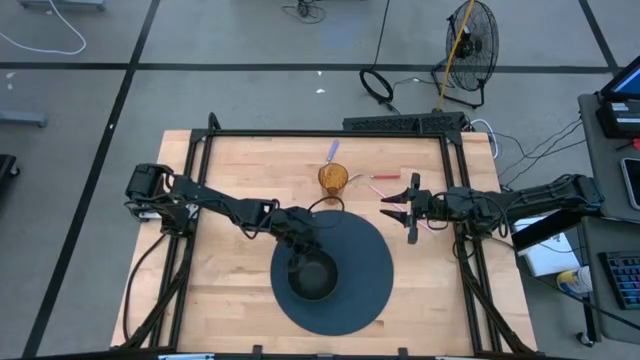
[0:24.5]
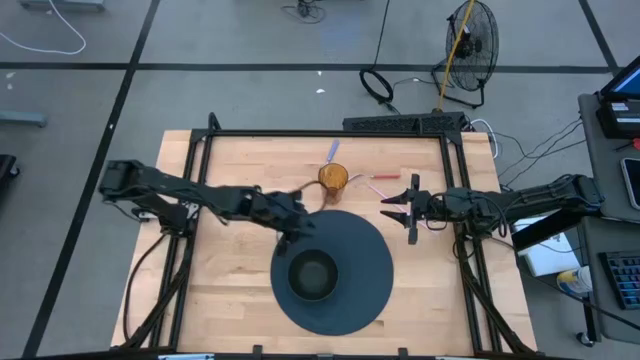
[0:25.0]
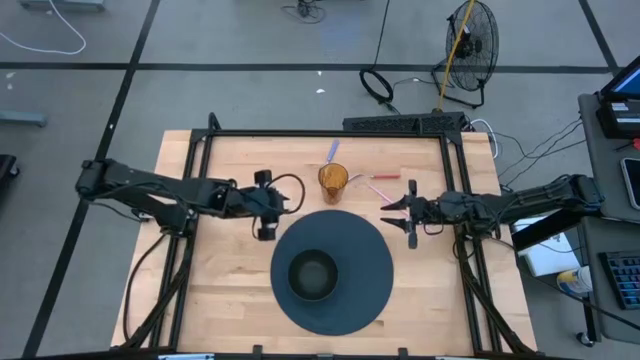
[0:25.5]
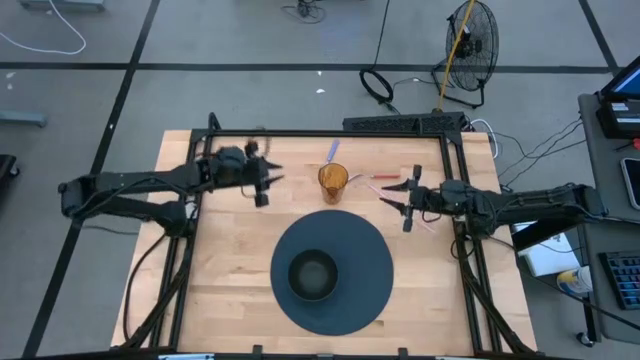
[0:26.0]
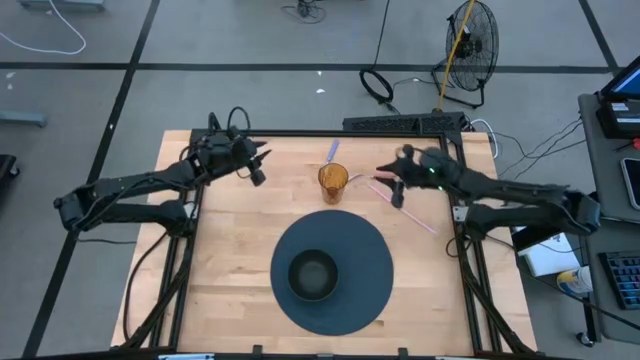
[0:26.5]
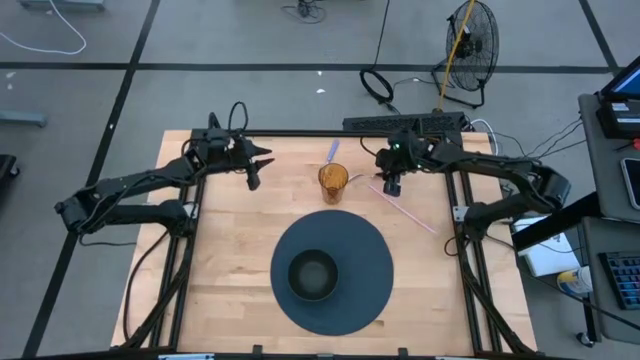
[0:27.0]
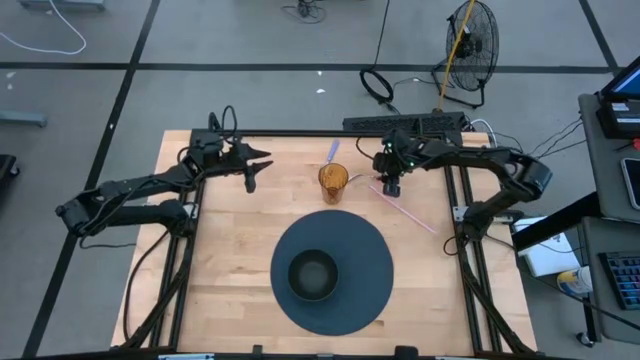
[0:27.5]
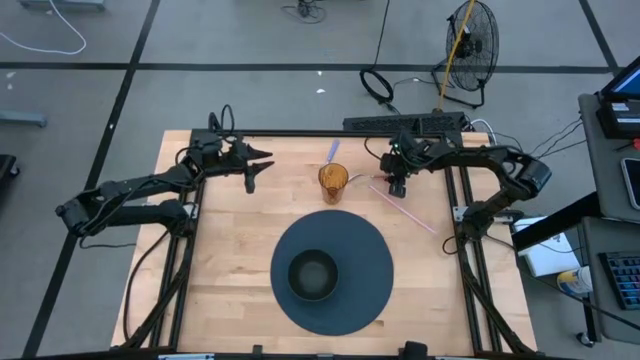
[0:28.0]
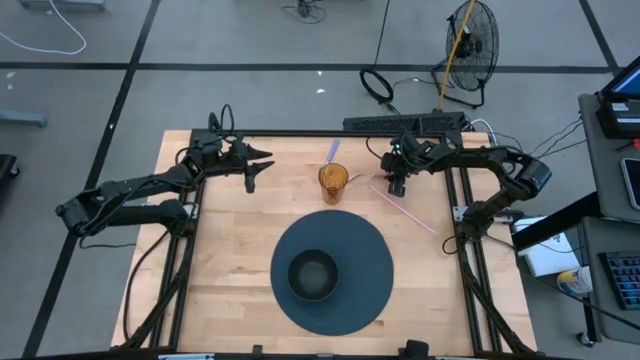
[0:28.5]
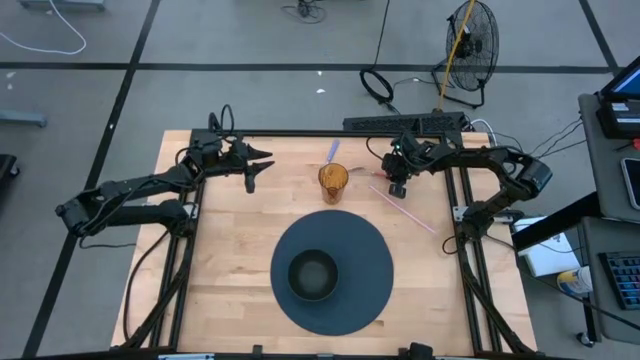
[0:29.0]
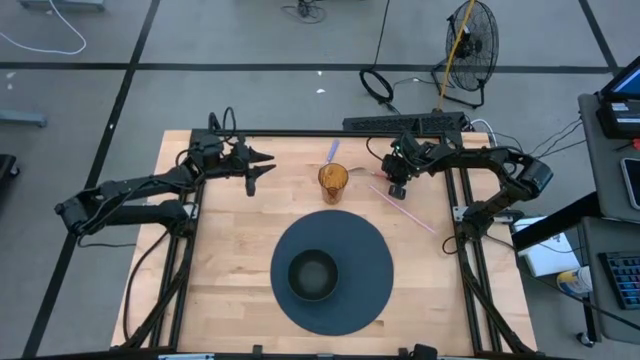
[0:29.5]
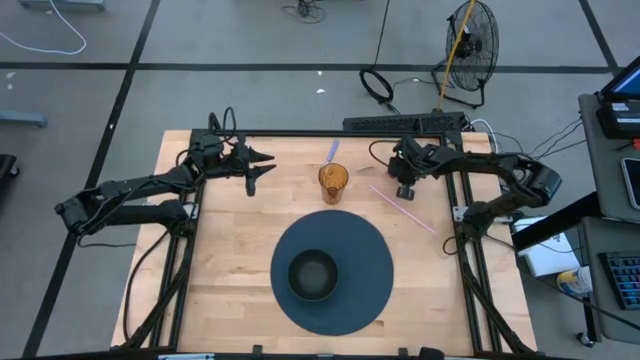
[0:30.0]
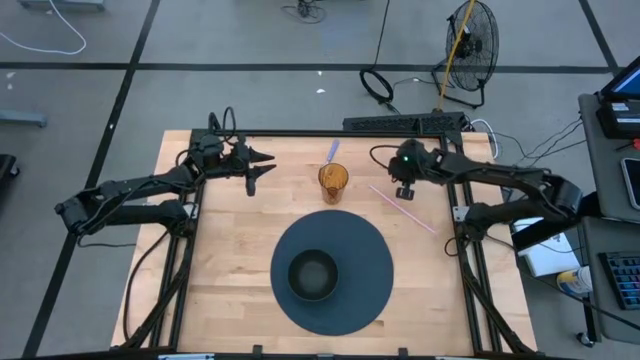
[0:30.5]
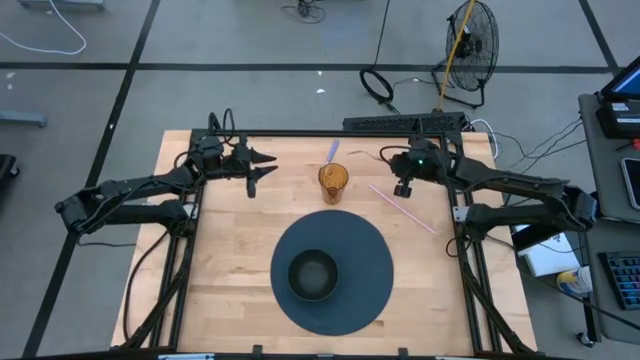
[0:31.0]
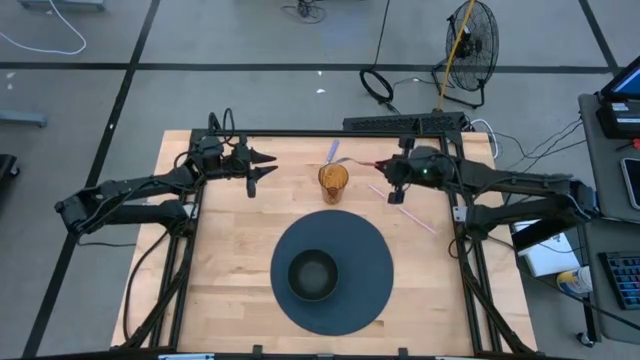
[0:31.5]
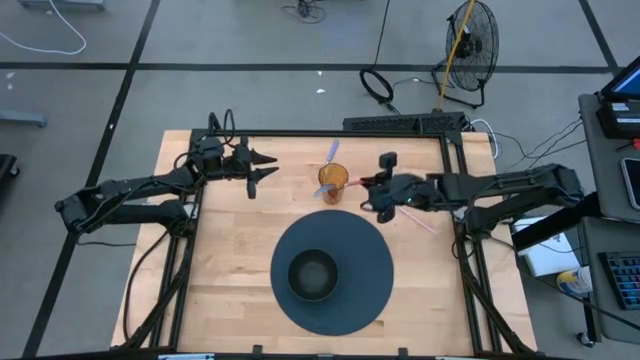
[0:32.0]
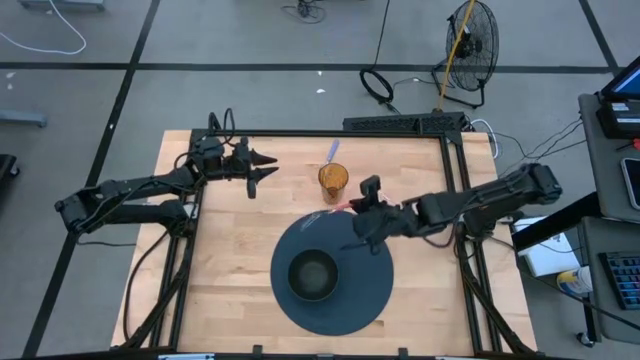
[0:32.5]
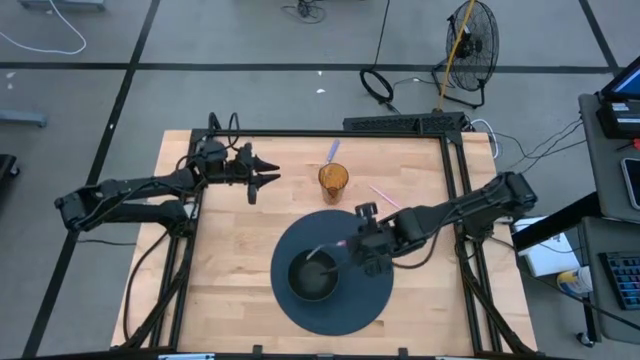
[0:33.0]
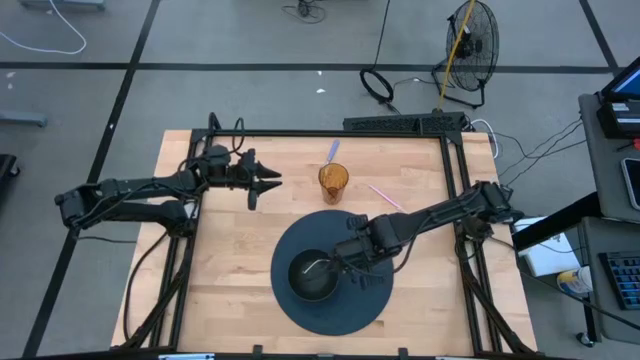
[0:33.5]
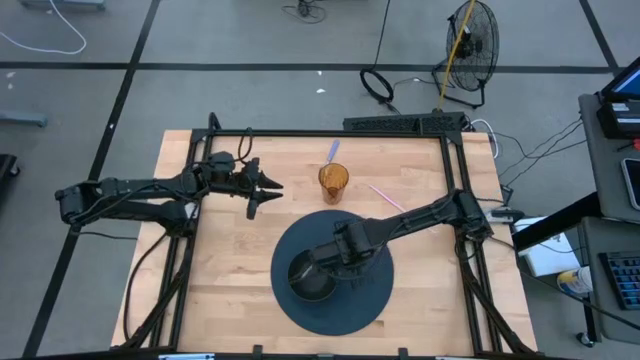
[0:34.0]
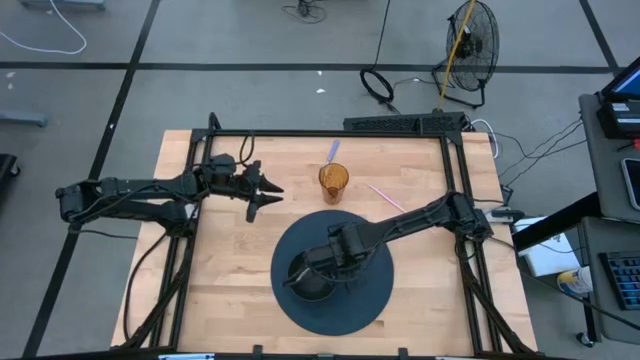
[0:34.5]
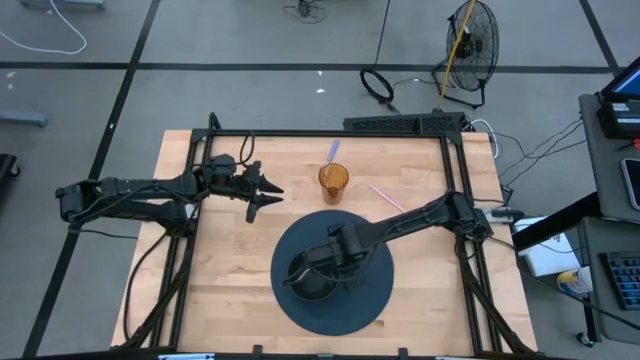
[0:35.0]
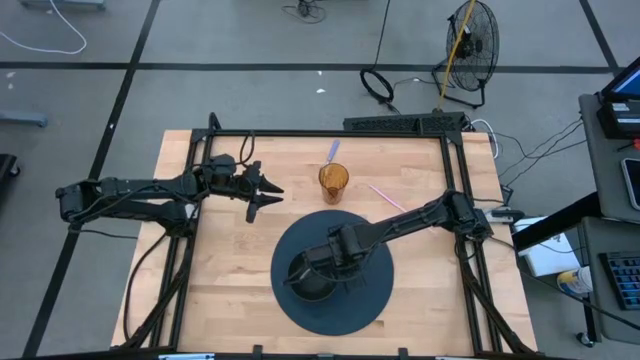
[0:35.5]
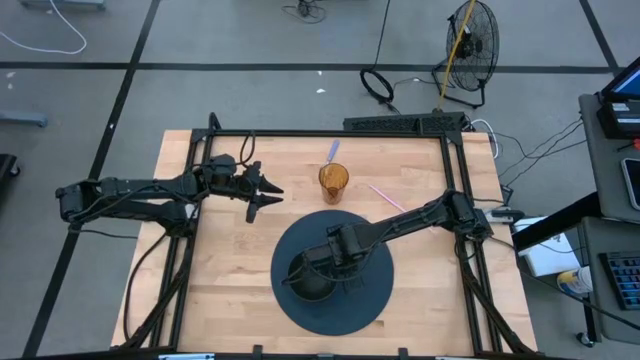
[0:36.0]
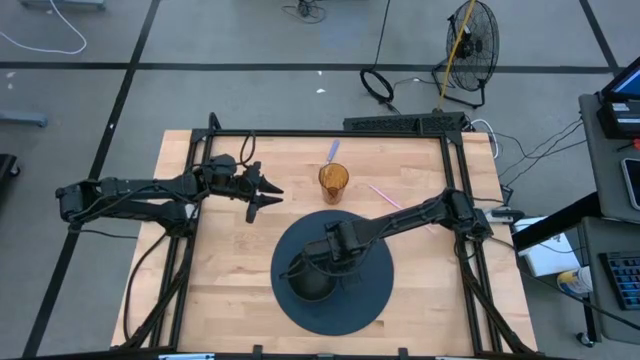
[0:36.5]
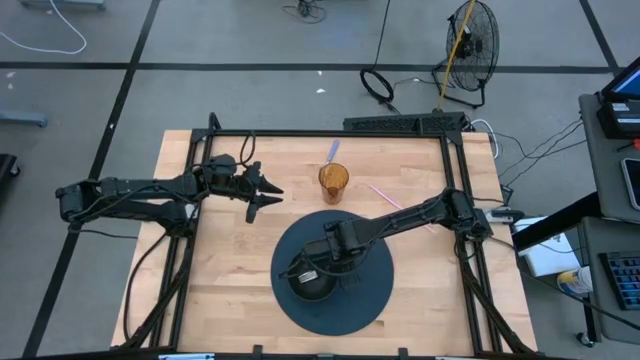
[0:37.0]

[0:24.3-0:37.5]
Task: Pick & Place Utensil
Put the pink fork into the black bowl

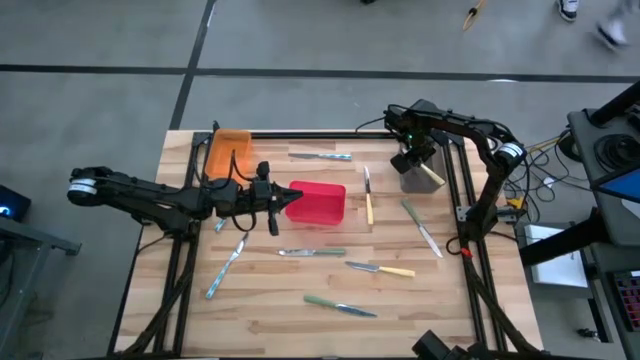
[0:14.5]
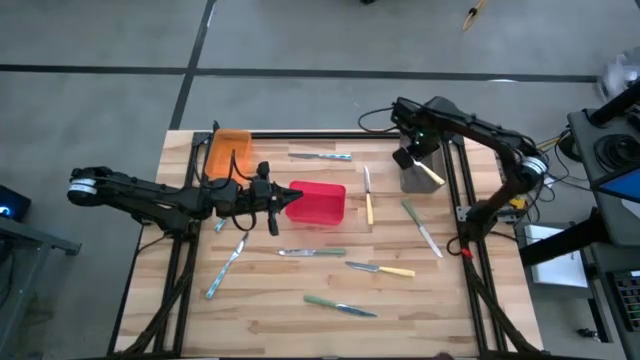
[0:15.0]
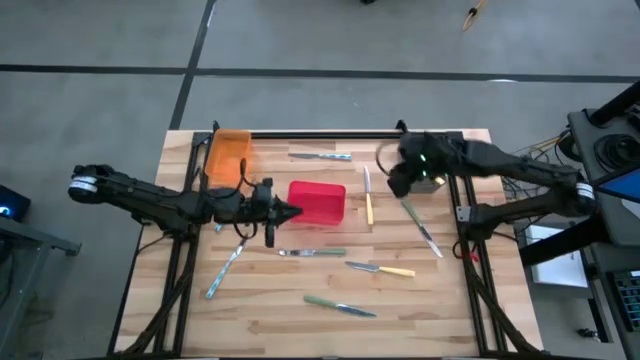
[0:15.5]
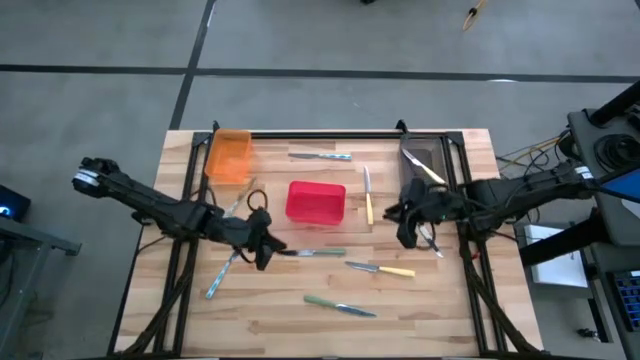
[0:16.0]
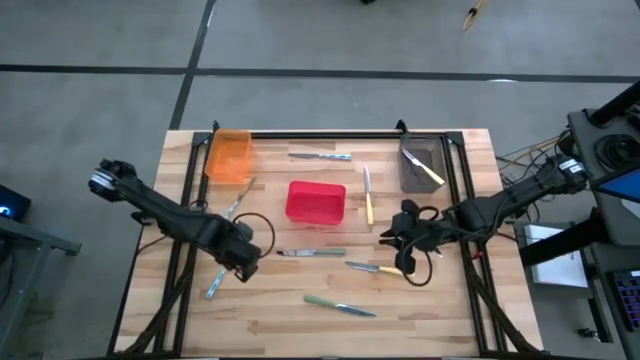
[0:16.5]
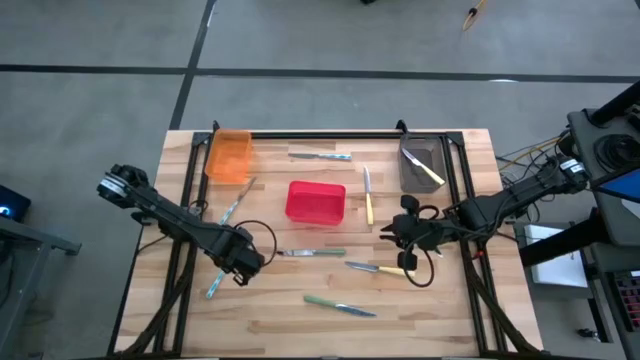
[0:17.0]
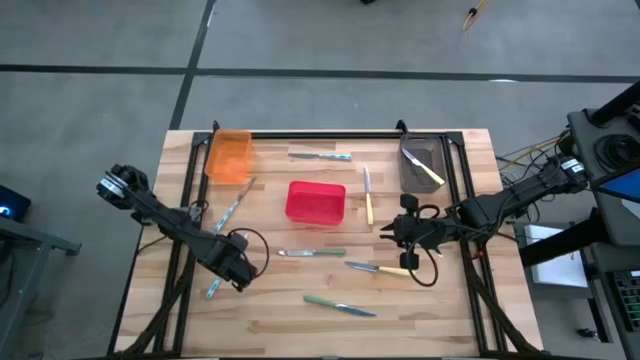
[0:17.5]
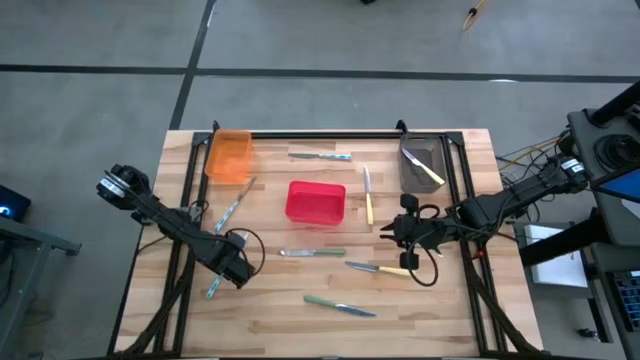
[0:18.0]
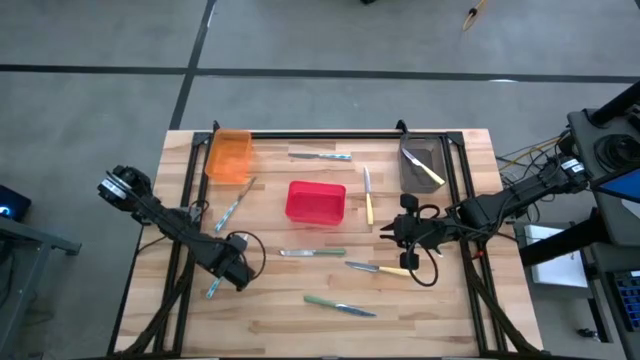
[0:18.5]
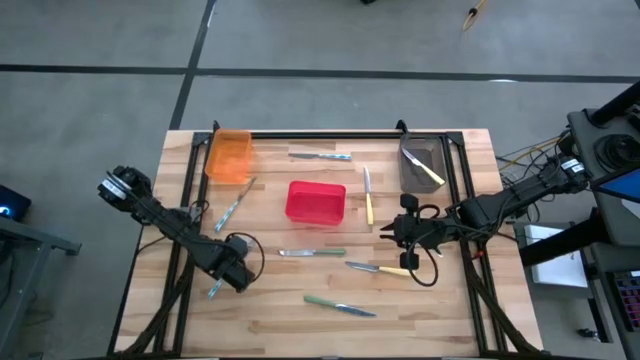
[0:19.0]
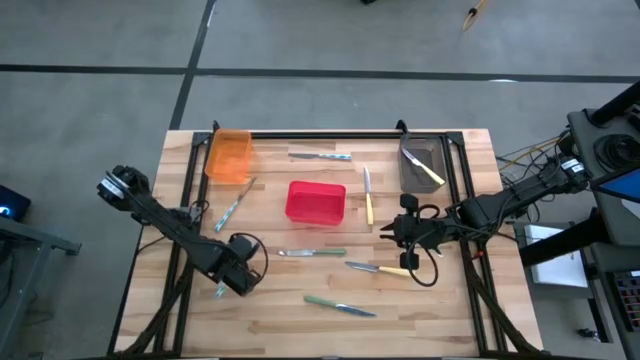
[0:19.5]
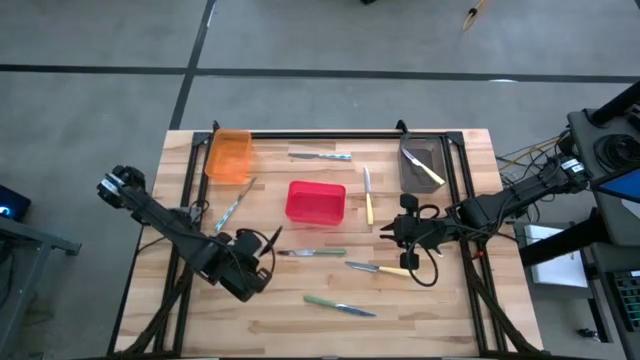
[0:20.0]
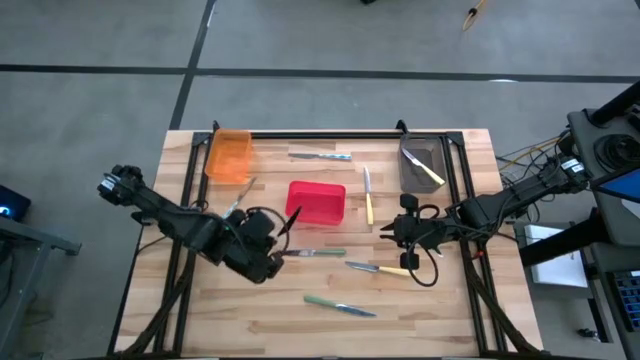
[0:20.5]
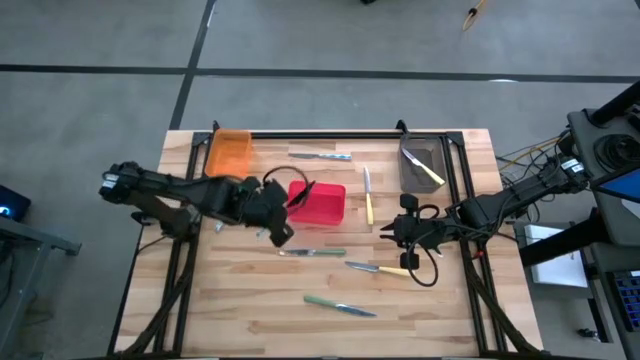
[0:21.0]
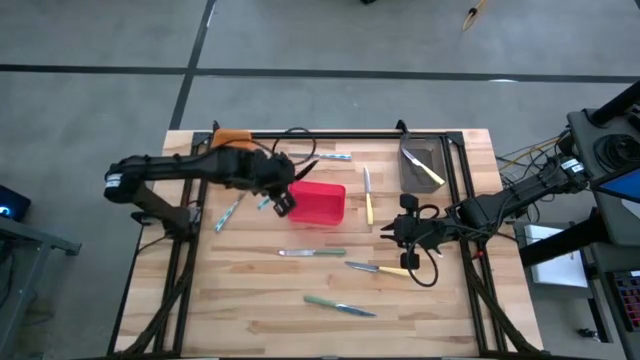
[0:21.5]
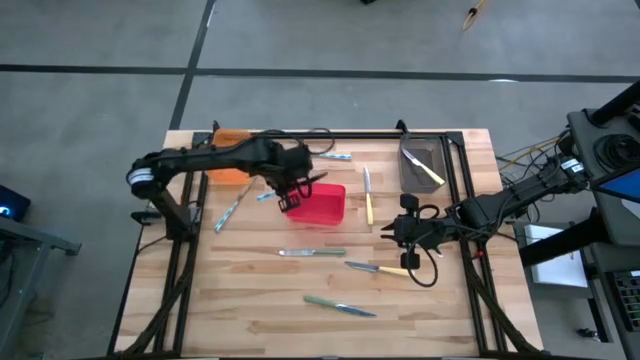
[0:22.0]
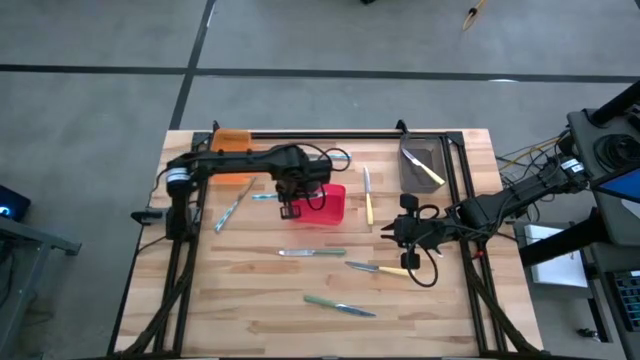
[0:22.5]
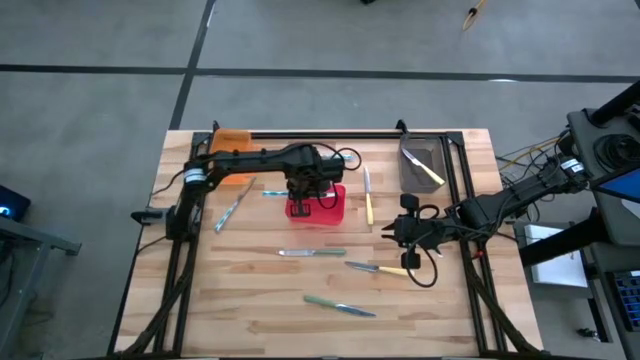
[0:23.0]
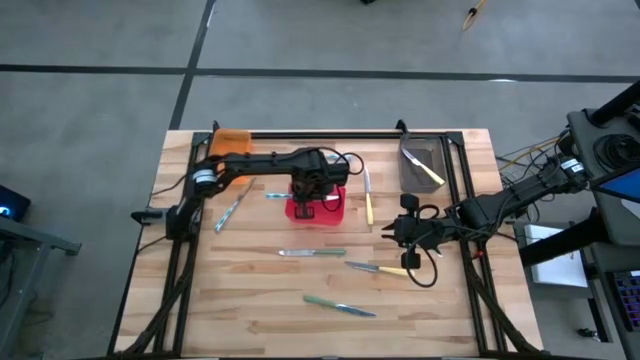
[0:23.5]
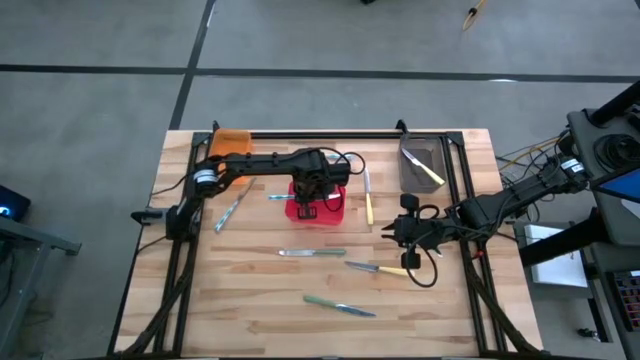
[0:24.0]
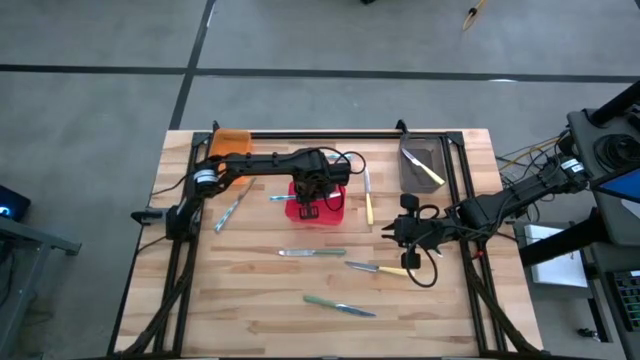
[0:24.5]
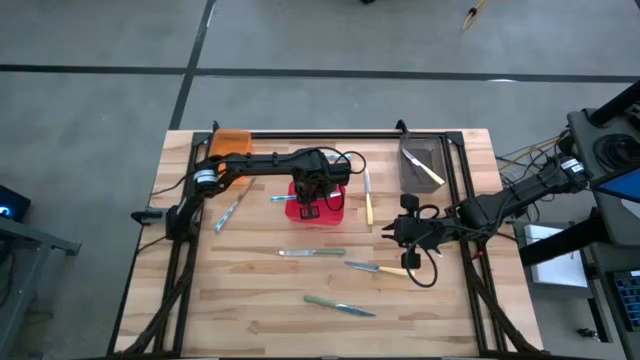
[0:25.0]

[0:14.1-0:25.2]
Task: Sort silverware by color (type)
Put the bottom white patterned table knife into the red bin
